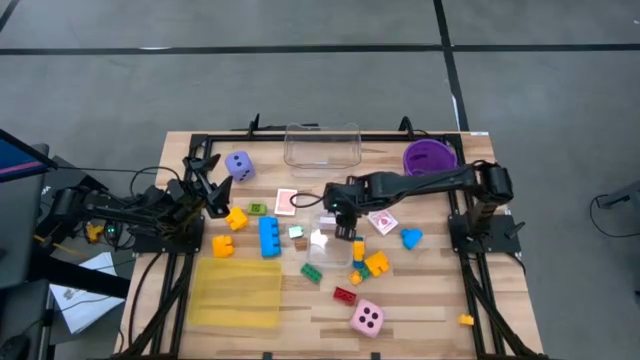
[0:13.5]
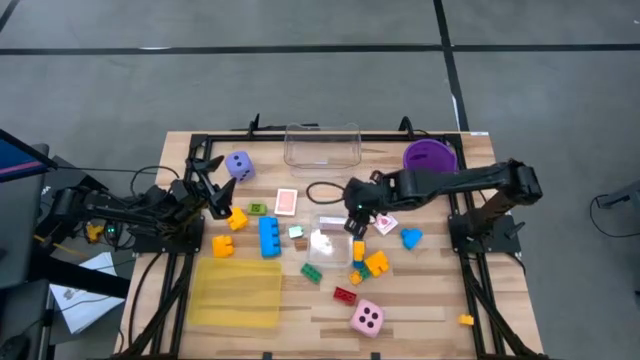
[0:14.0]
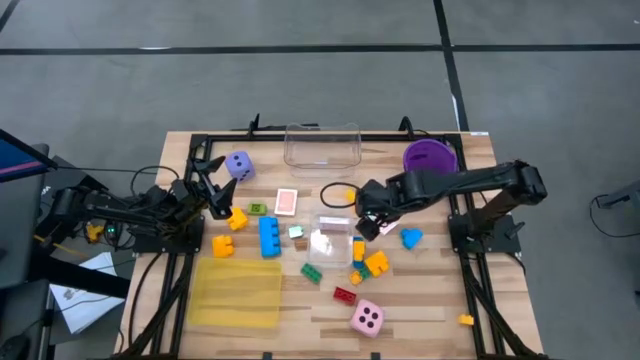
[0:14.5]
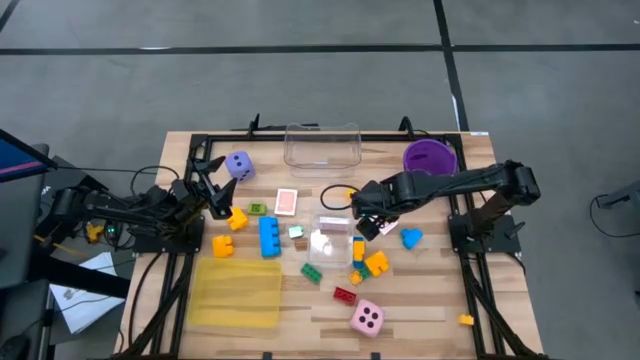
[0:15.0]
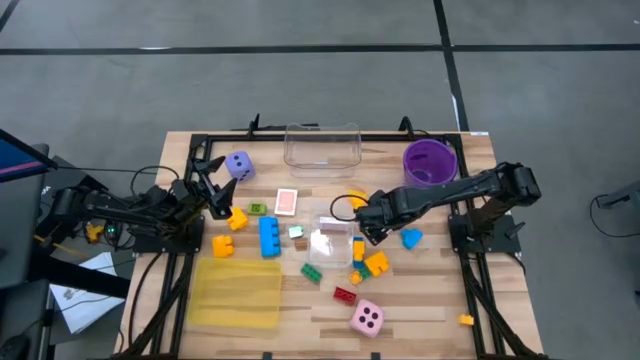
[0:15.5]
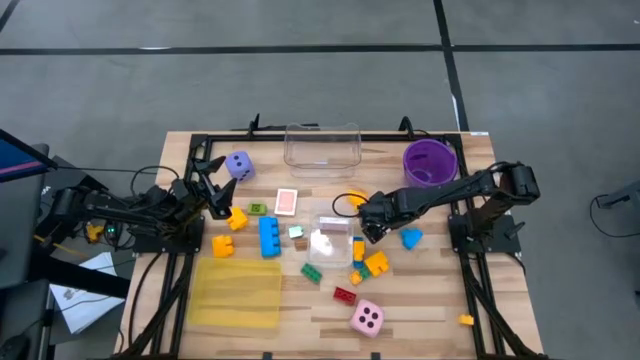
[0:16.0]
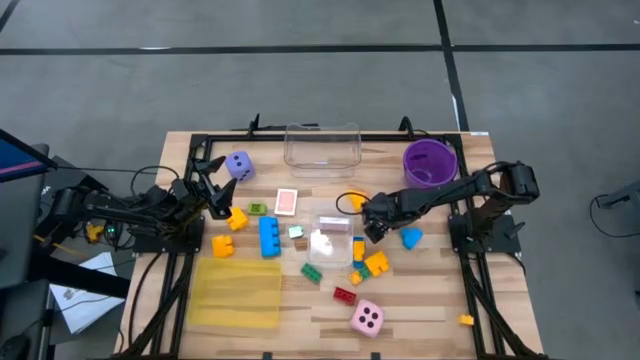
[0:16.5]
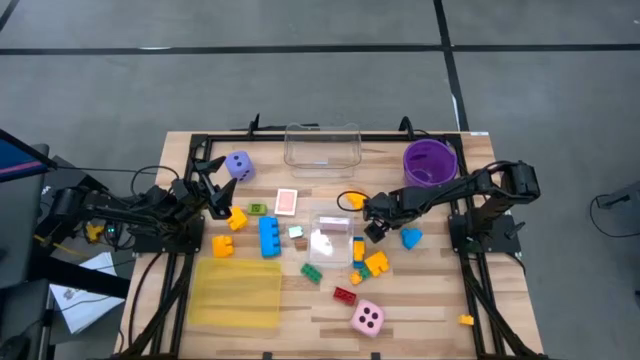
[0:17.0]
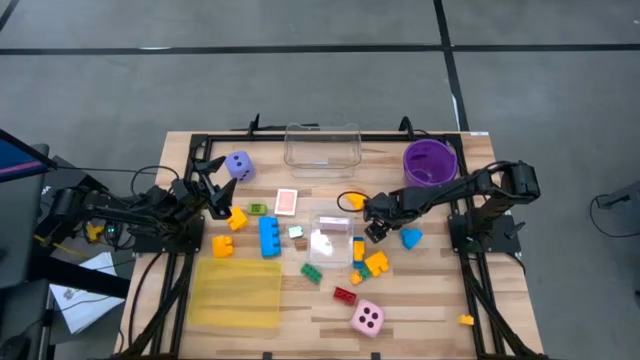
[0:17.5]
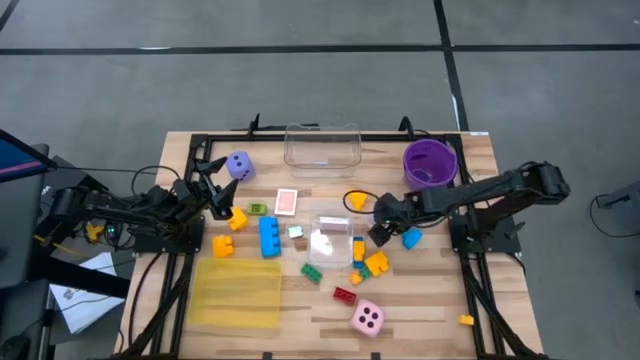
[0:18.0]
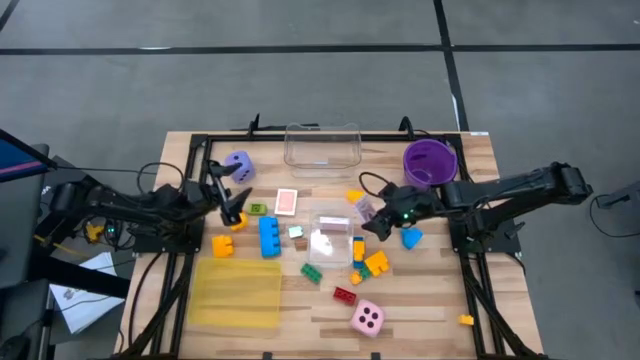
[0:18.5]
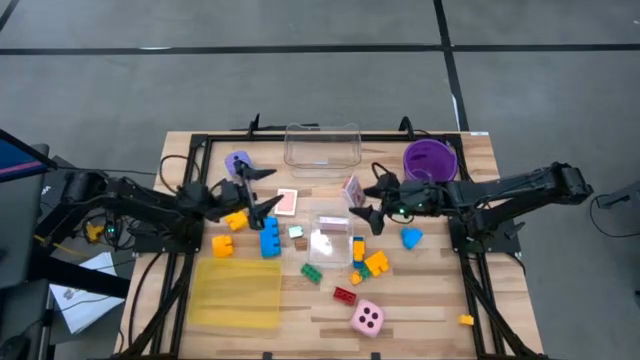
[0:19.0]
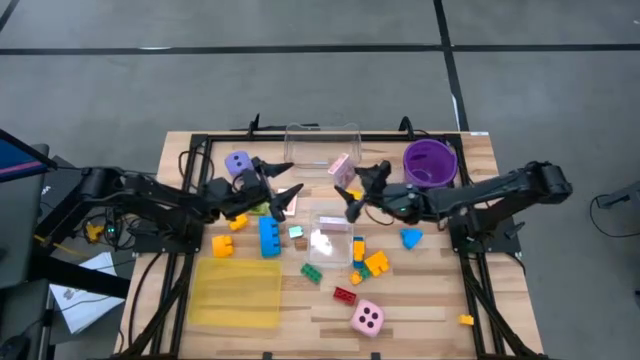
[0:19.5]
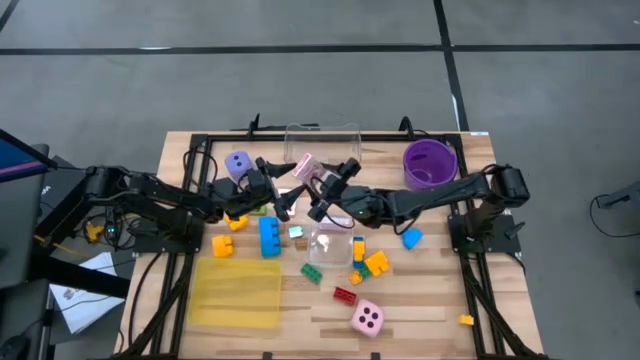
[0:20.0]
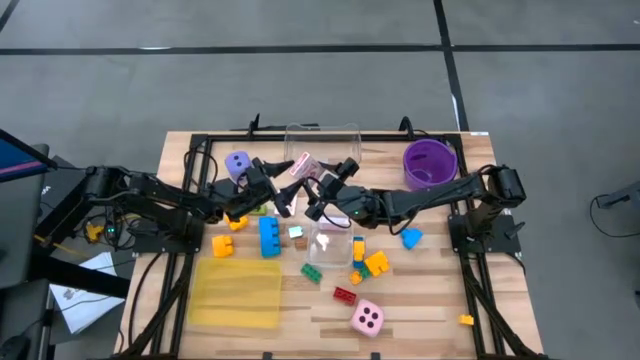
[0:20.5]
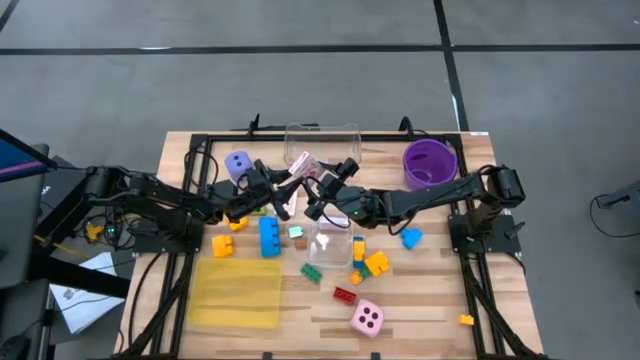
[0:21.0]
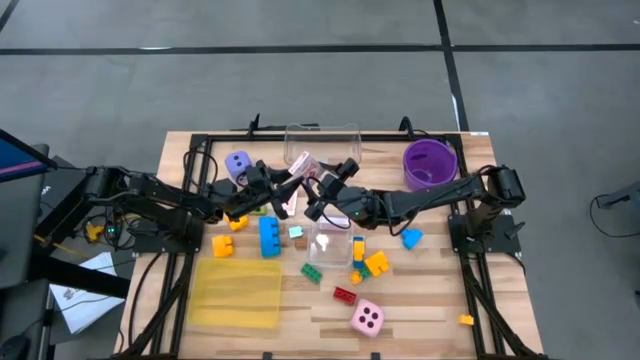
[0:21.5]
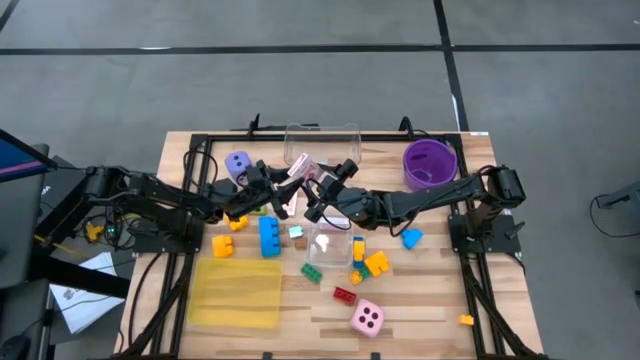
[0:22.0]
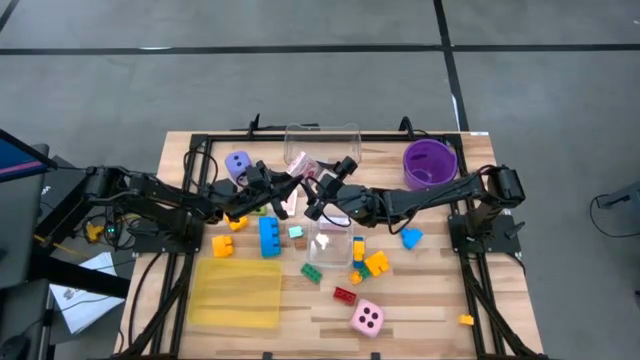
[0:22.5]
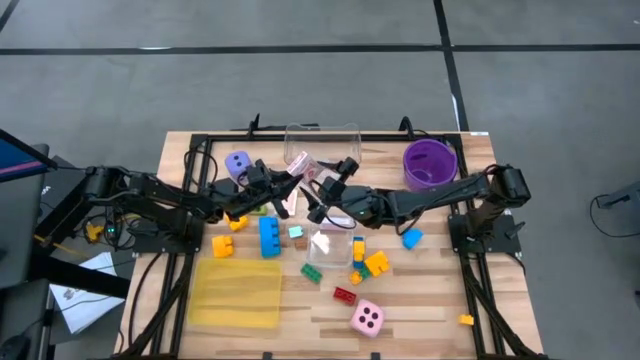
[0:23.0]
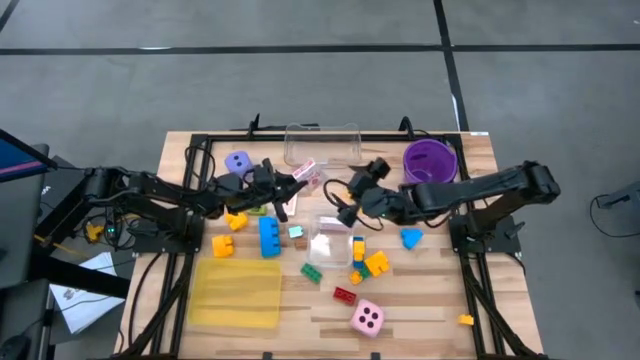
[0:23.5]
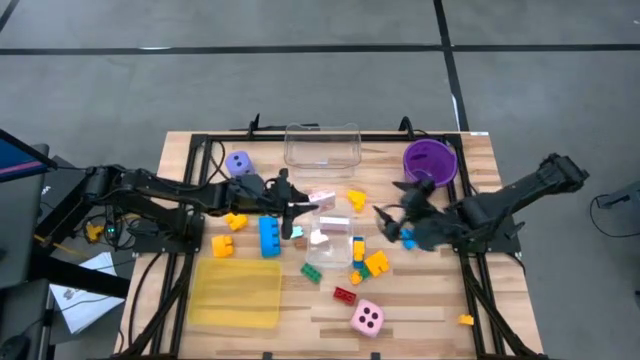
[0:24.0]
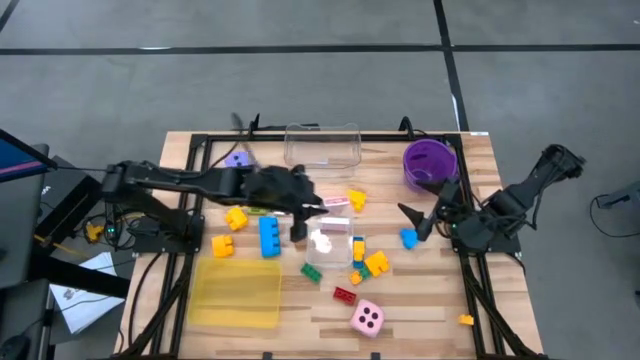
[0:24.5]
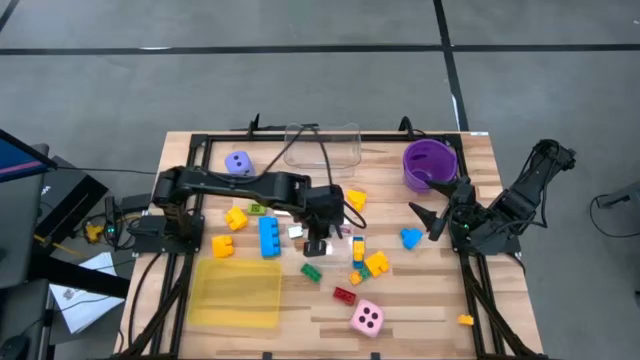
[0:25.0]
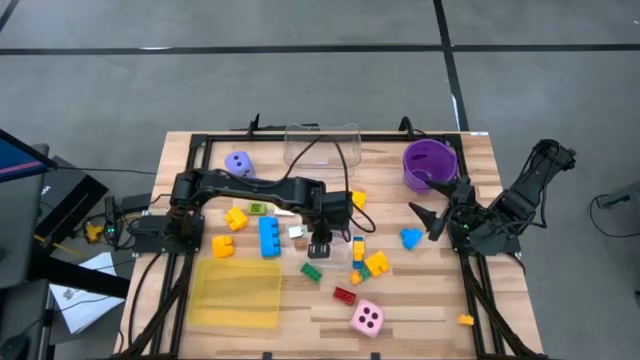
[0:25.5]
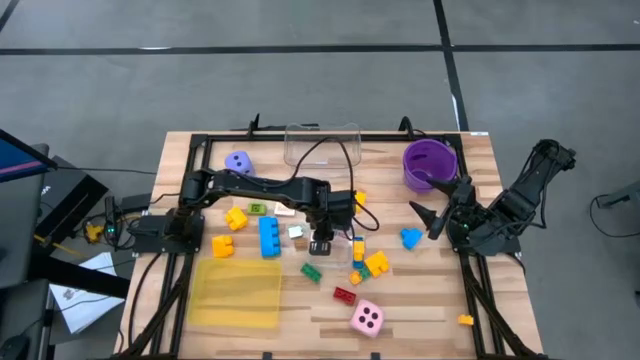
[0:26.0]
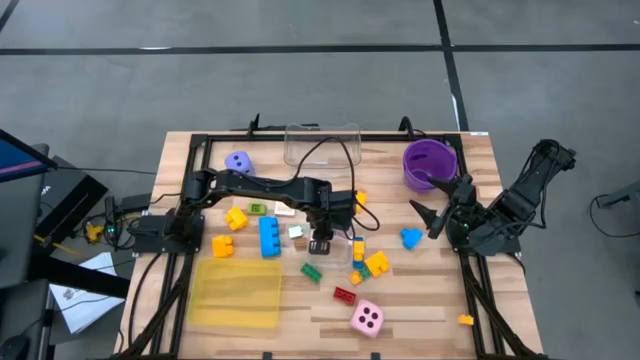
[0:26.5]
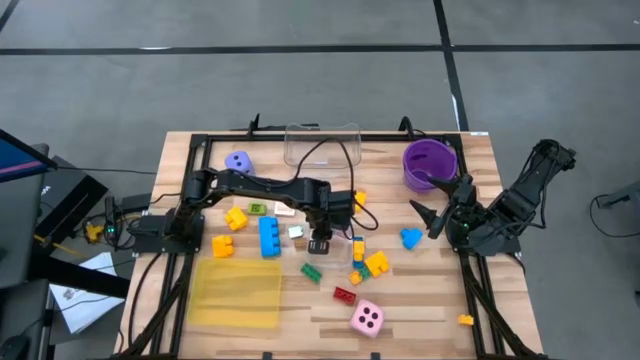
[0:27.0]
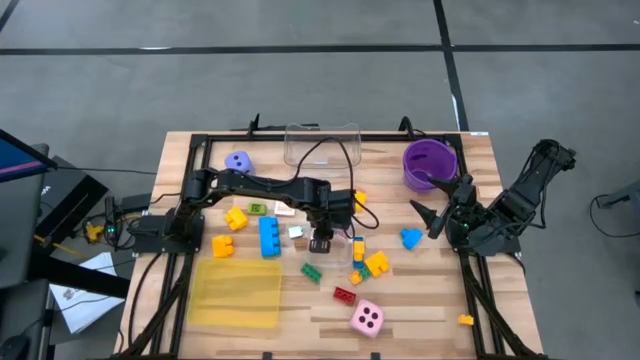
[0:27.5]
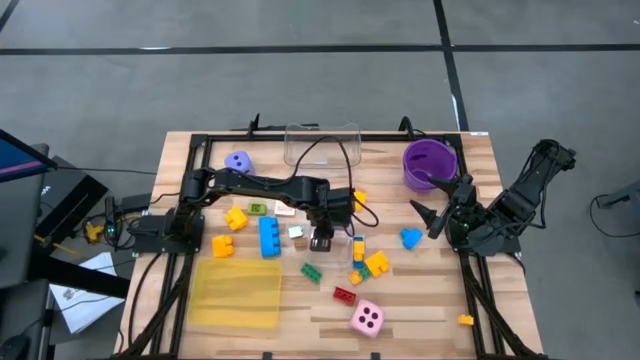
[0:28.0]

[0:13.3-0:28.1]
Task: Pick & Place Toys
Put the red playing card box into the bottom transparent bin

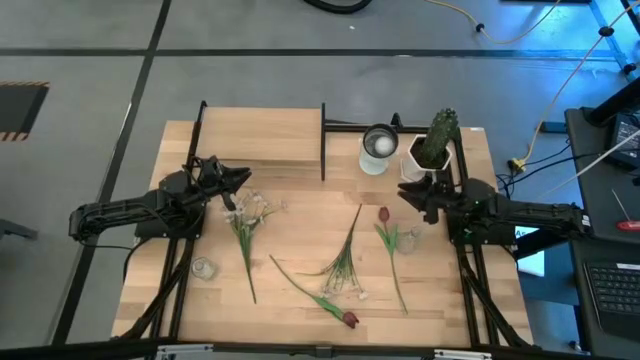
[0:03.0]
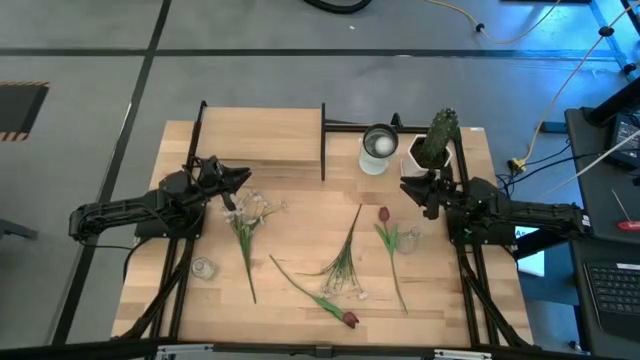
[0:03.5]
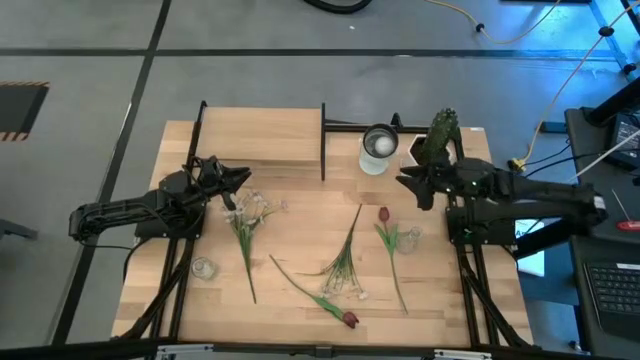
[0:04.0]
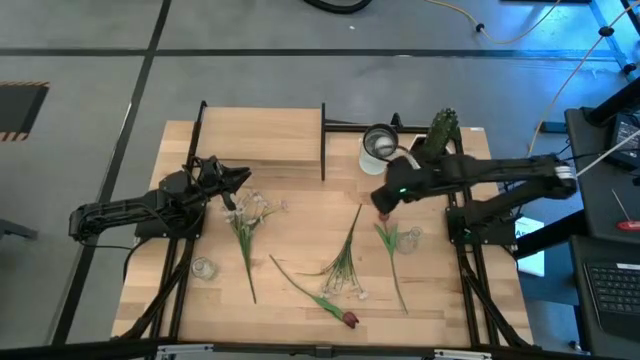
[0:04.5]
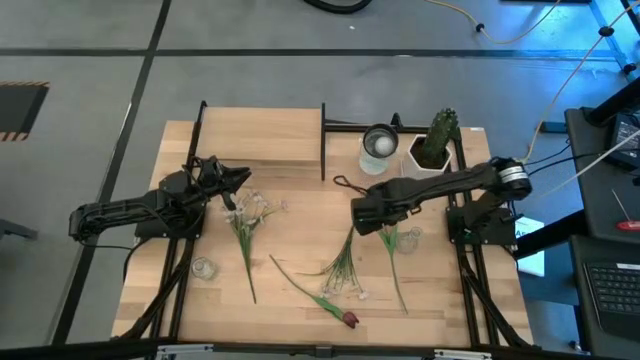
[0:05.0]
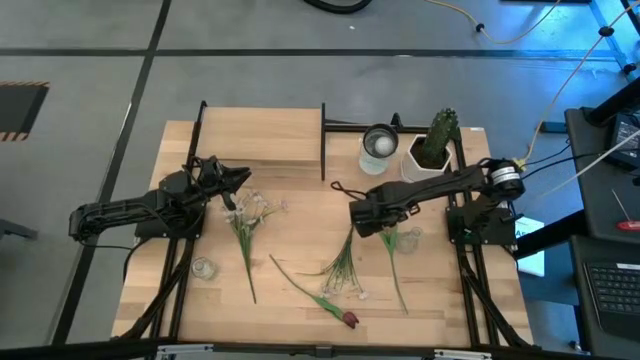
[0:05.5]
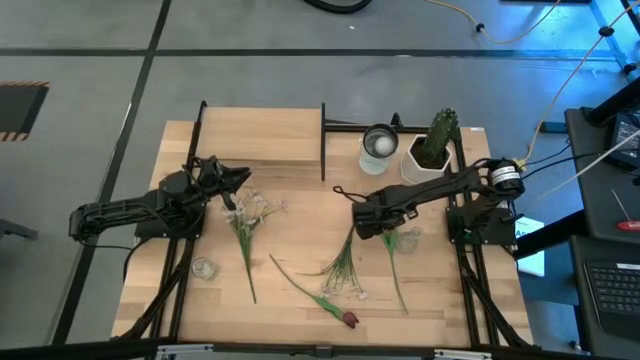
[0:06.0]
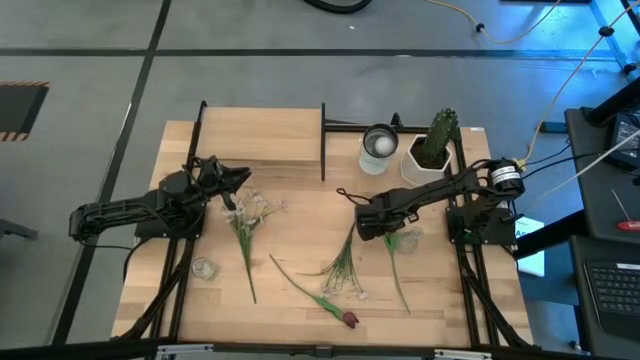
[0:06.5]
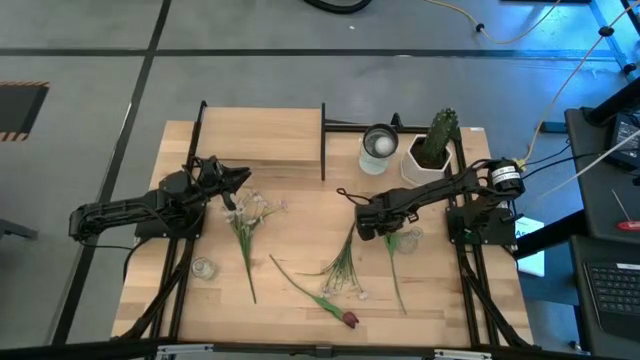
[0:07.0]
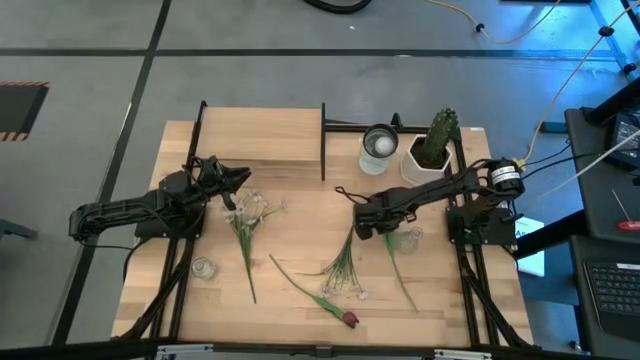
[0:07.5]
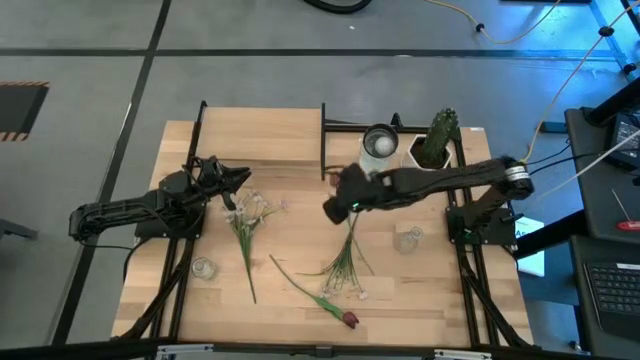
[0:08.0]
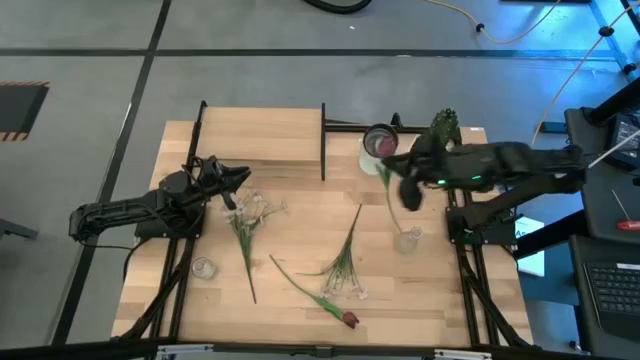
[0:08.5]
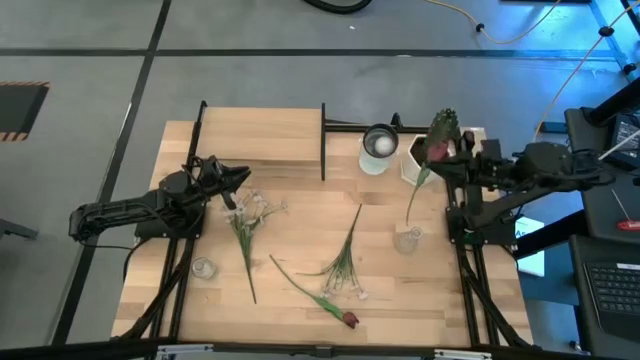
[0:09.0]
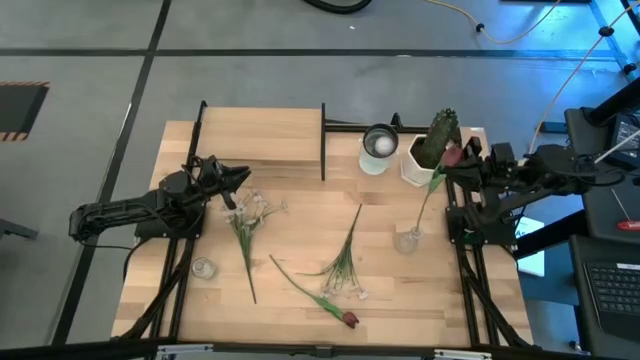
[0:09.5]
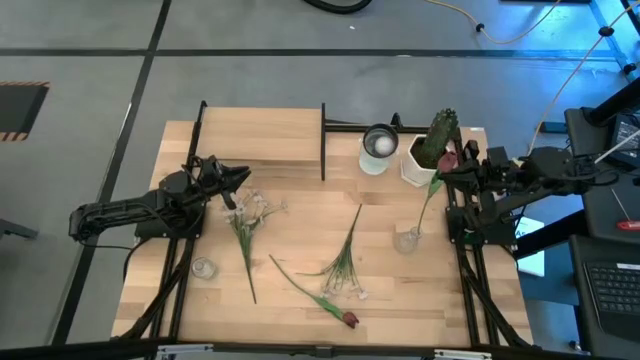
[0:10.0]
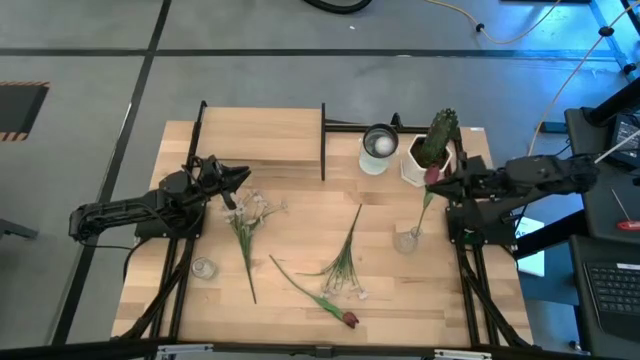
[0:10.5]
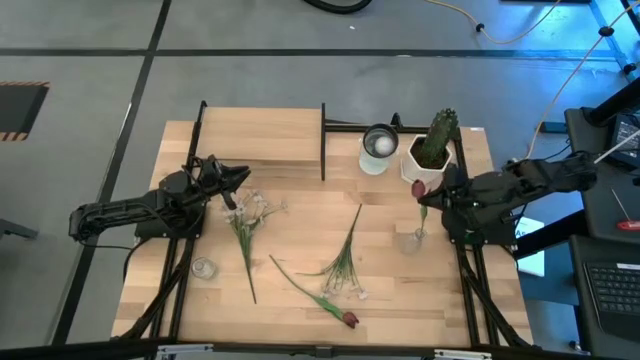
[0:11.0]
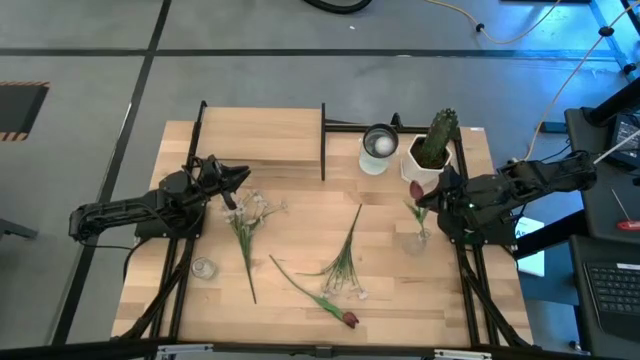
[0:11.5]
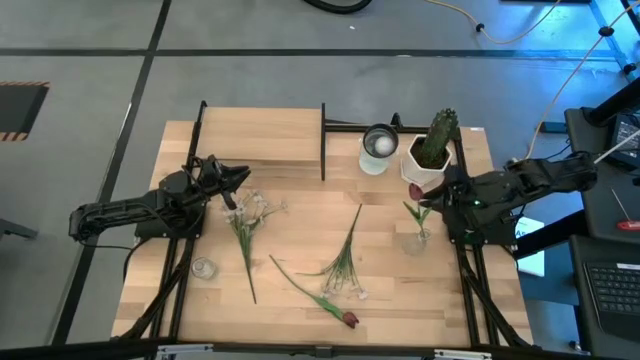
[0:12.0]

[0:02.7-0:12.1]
Task: Pick and place flowers into a vace then onto a shelf
Put the right red flower into the right transparent vase
